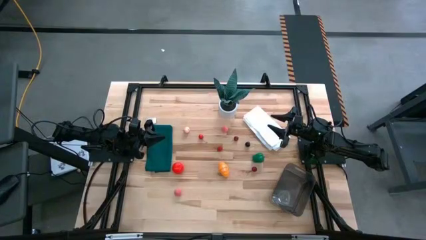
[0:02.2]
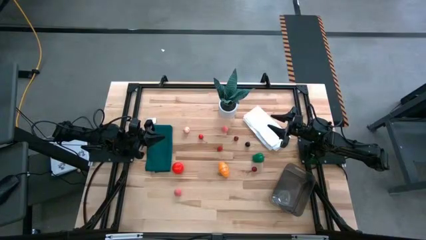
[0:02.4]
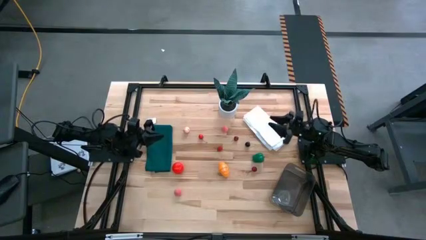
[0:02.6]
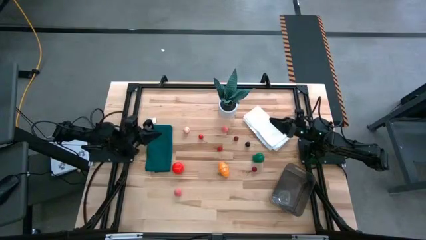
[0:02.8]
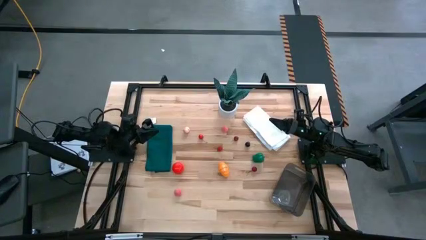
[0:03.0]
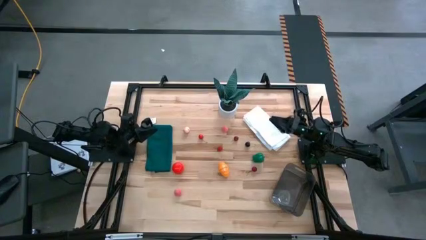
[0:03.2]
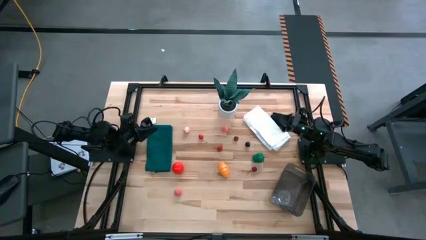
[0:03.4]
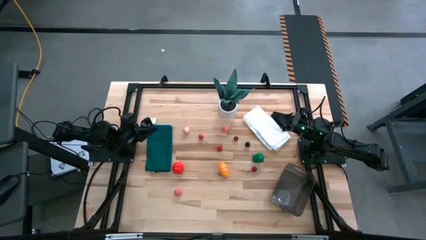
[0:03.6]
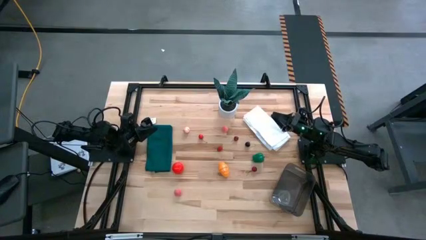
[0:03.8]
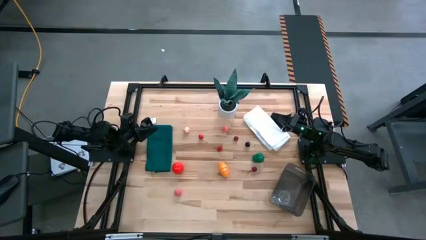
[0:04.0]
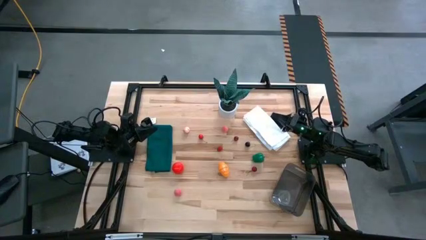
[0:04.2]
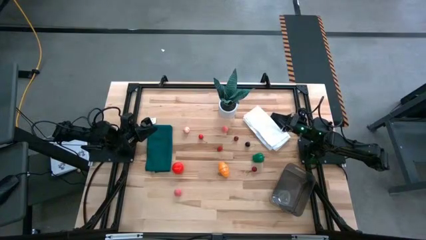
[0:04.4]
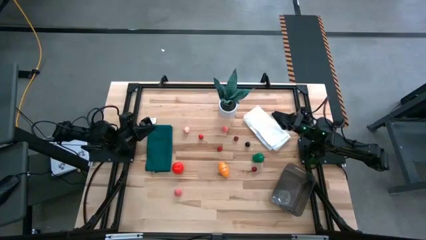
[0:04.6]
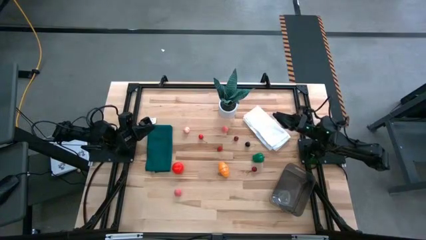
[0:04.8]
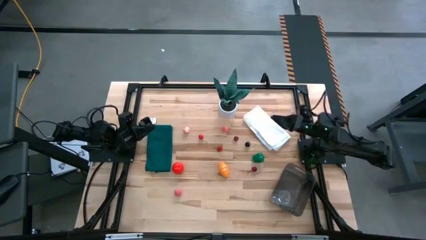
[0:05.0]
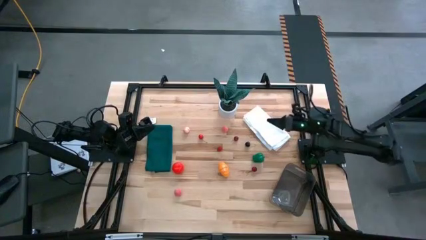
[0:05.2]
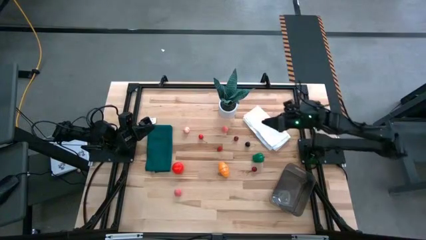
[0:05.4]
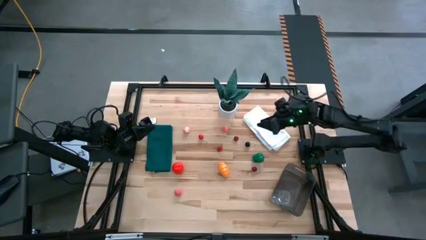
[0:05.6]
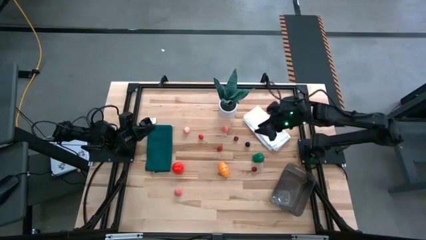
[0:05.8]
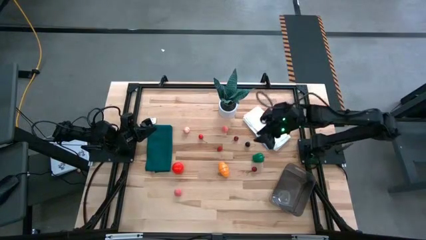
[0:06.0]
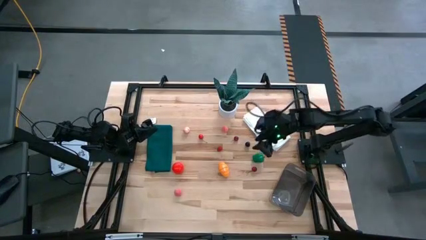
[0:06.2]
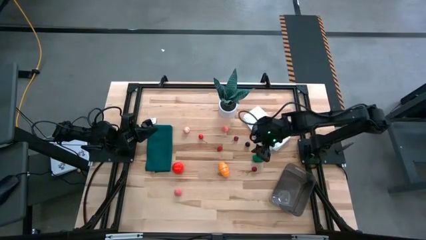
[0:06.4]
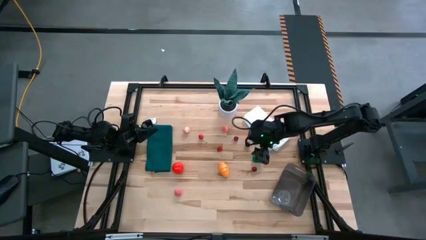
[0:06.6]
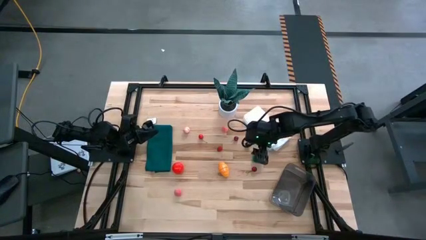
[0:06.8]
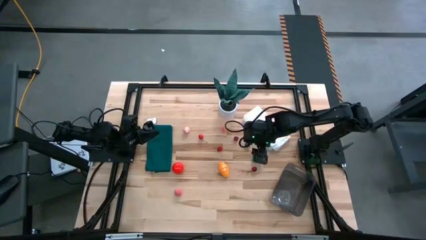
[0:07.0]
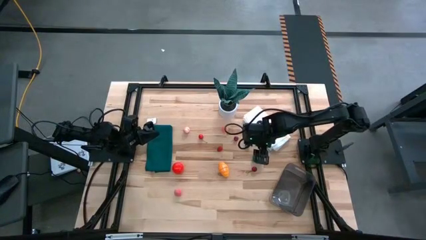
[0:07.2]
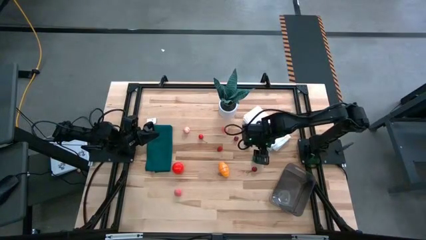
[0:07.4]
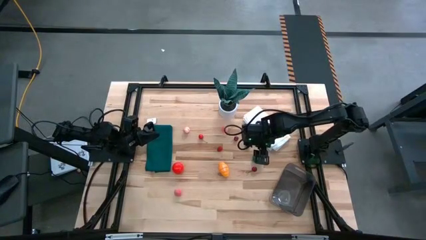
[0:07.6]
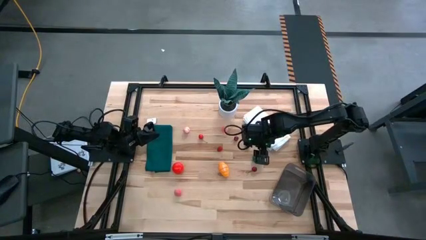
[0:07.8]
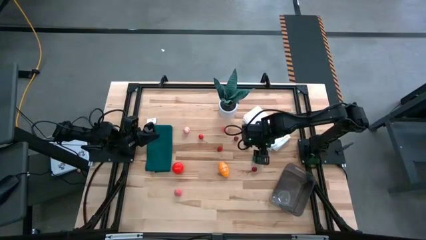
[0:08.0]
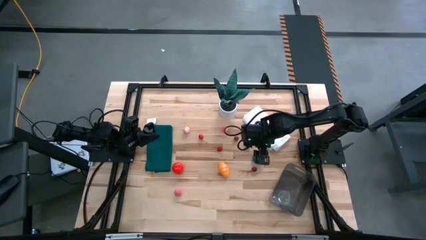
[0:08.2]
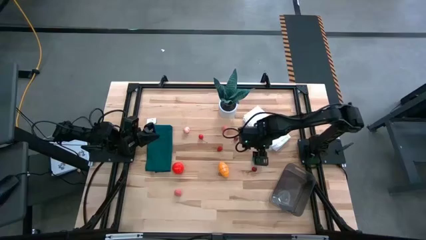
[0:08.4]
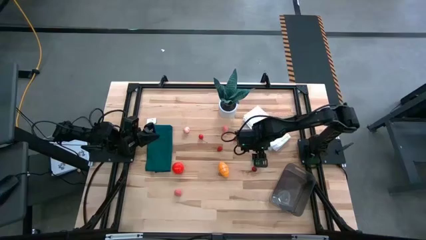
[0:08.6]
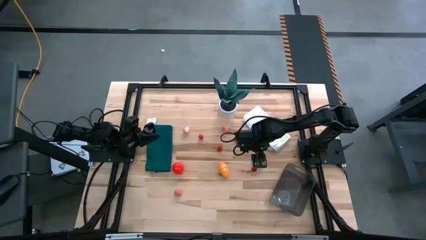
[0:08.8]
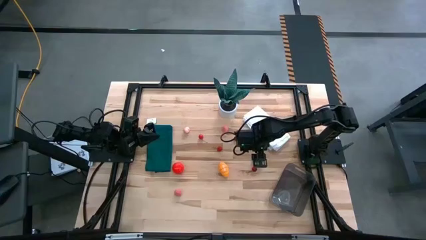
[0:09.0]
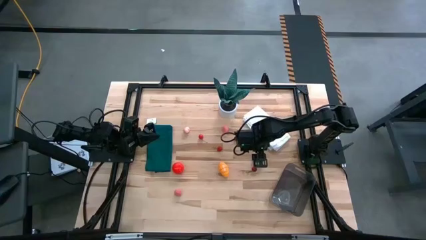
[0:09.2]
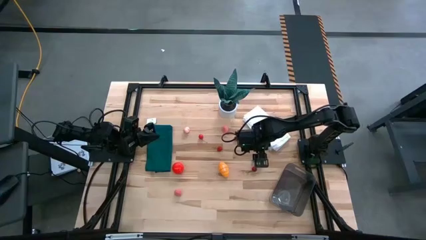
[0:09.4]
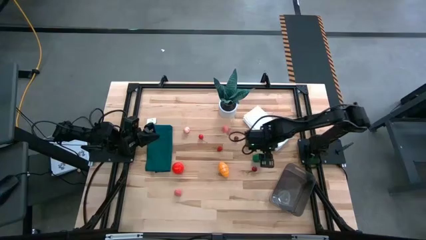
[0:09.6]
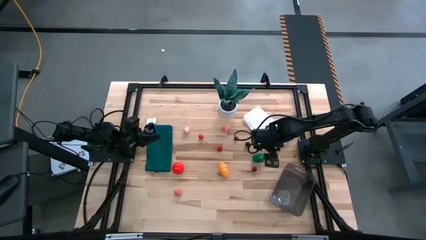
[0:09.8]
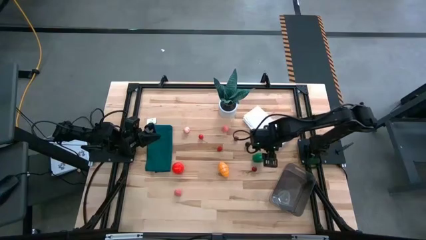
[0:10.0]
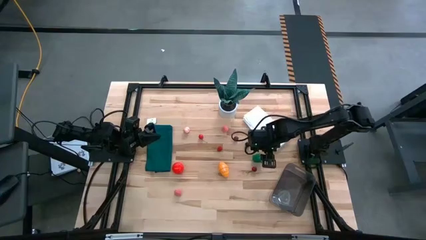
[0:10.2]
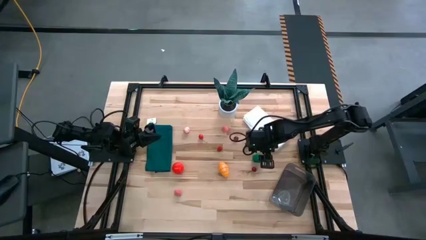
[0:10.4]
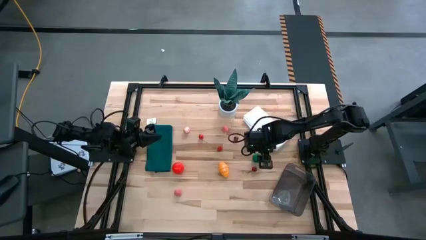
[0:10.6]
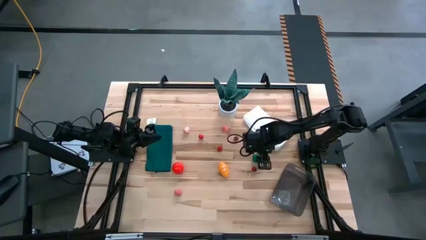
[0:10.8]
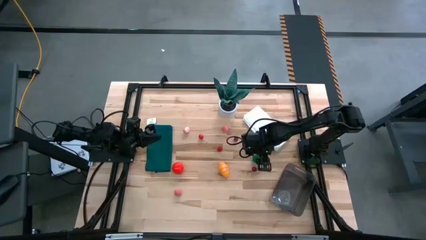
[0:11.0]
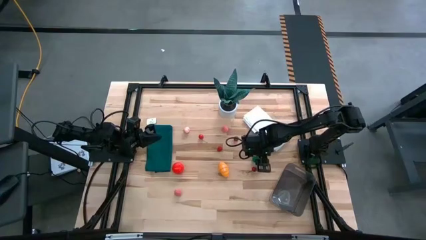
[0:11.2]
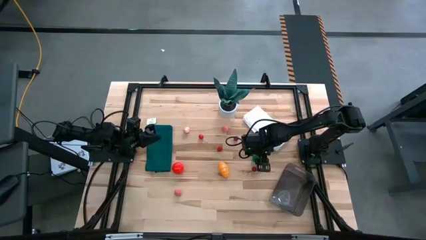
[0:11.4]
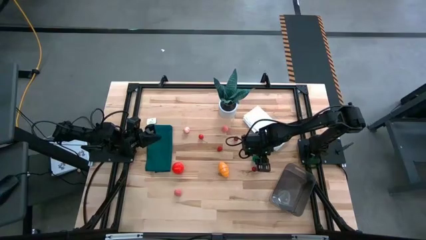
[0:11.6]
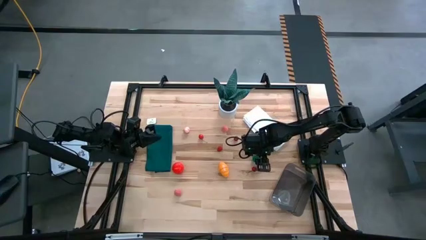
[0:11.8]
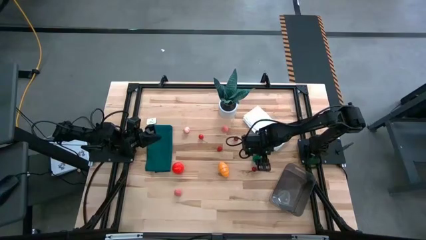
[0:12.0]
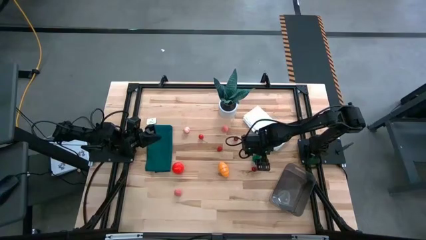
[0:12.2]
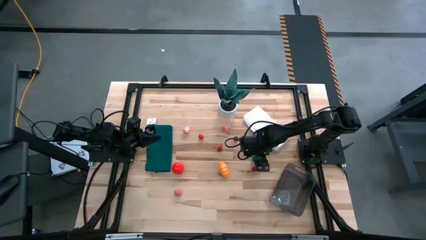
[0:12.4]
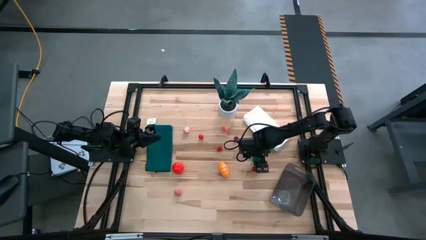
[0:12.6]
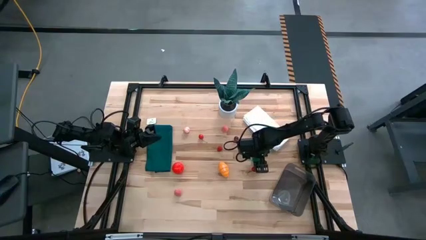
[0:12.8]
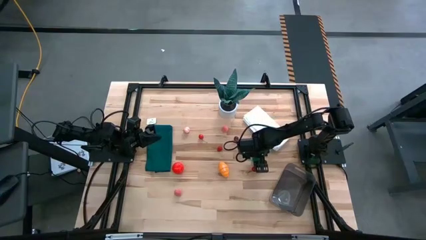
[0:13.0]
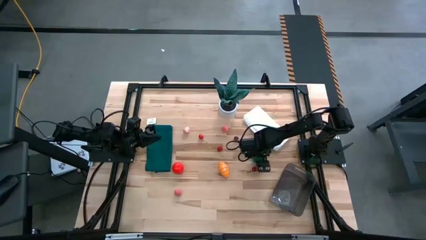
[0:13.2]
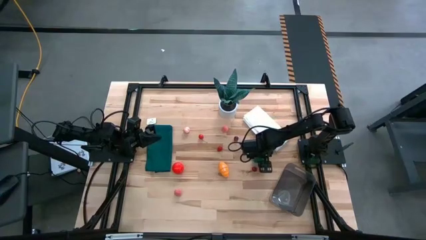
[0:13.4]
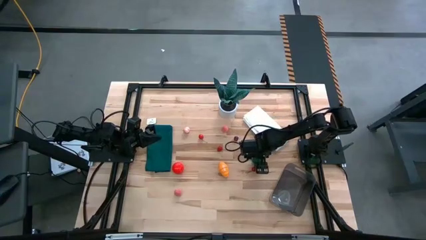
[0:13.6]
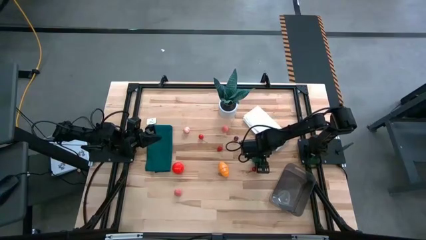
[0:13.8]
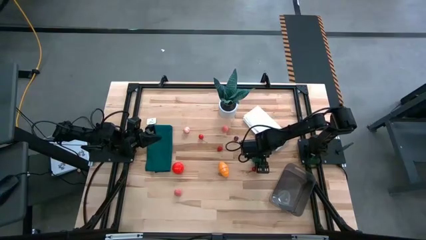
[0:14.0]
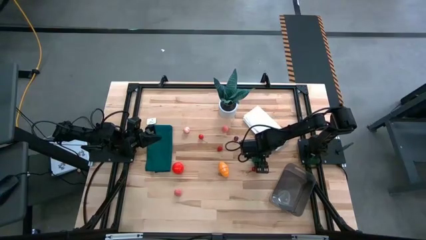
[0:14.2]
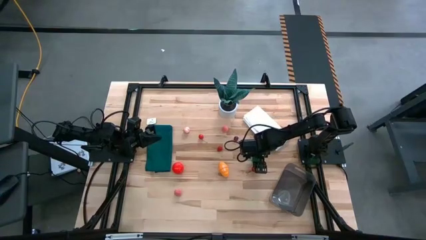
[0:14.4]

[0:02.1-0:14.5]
Task: Pick and placing Produce into tupperware
Put the green bell pepper into the black bin
